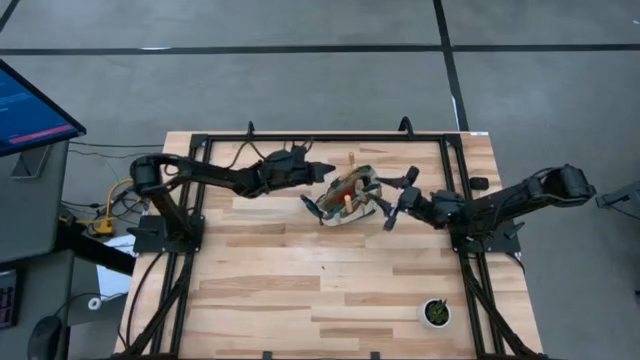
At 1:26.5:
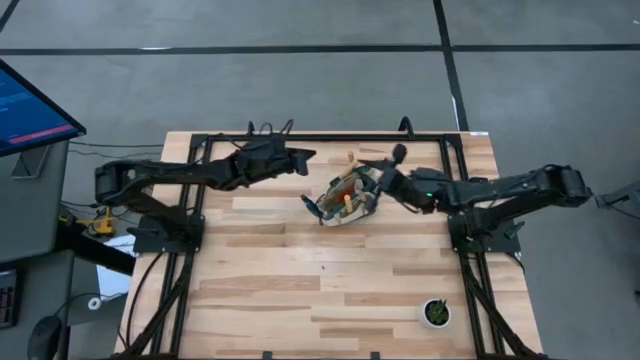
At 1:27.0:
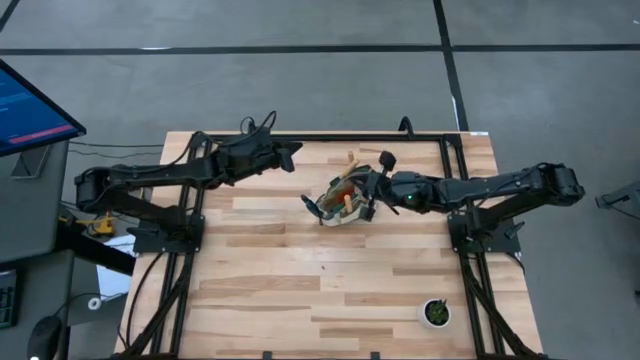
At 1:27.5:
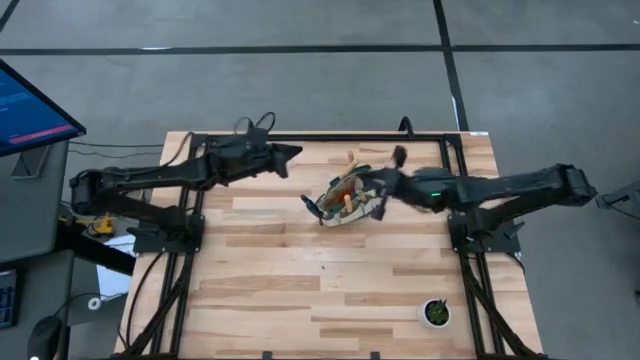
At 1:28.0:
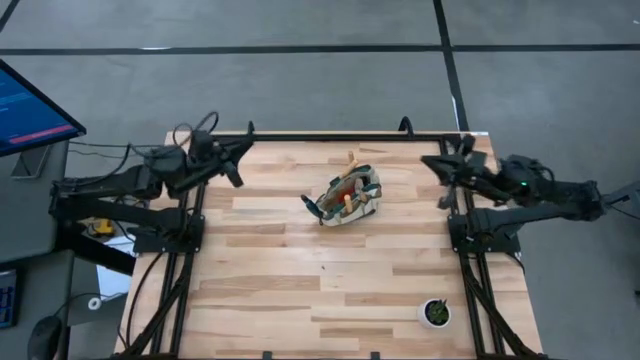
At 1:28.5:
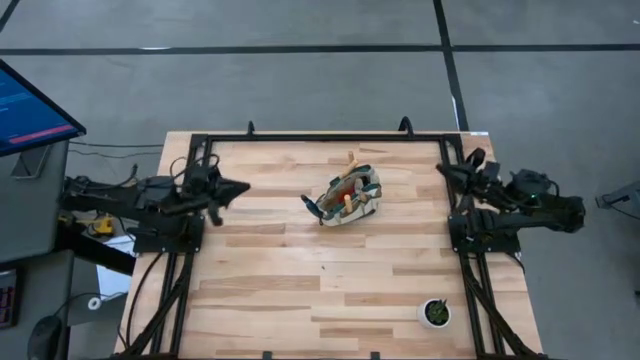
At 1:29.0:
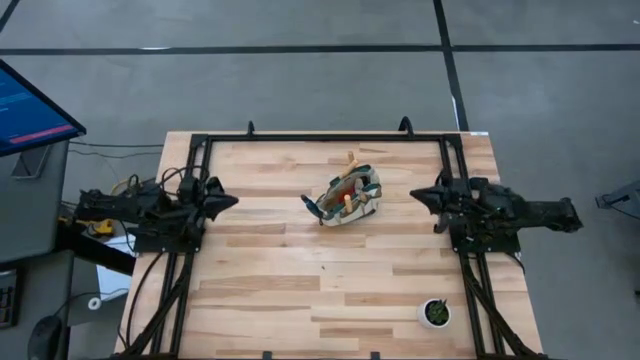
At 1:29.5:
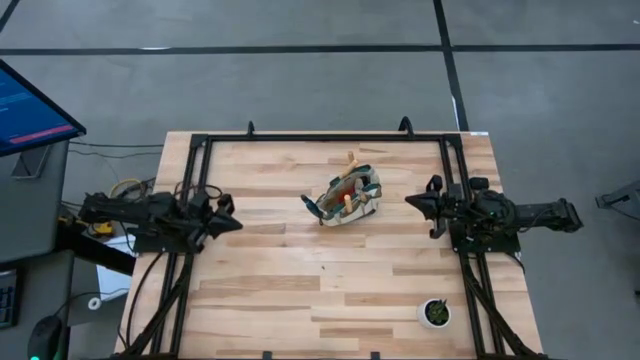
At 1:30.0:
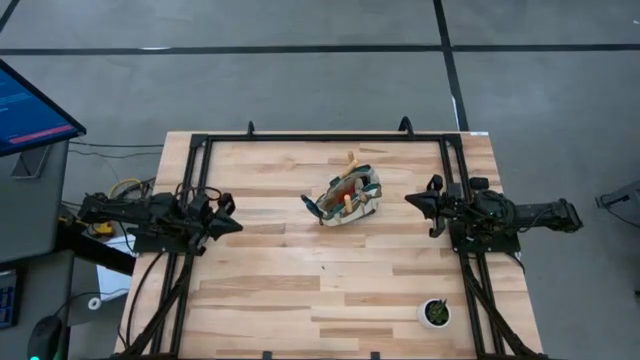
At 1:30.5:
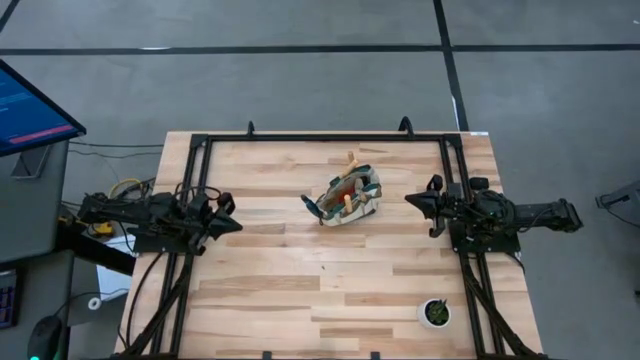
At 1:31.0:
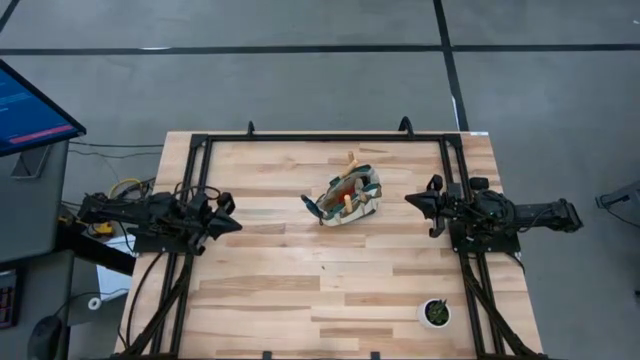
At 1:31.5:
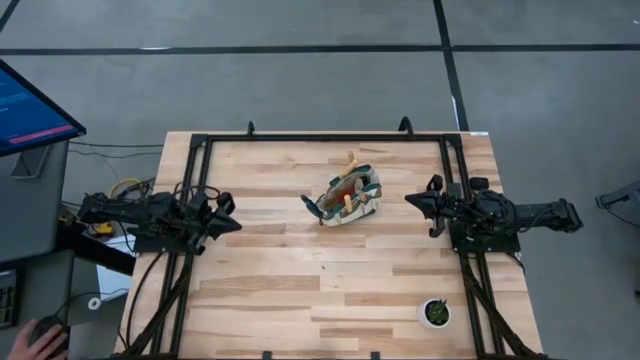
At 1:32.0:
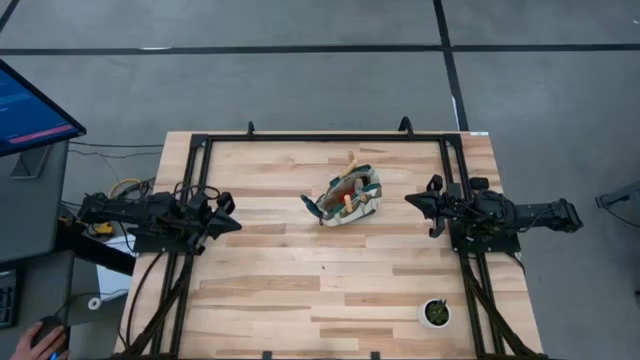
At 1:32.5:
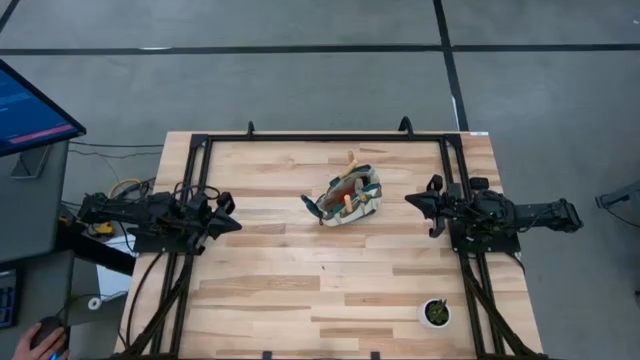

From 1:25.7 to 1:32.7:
Task: Pick & Place Garden tools in Gardening bag
Return to Home Position

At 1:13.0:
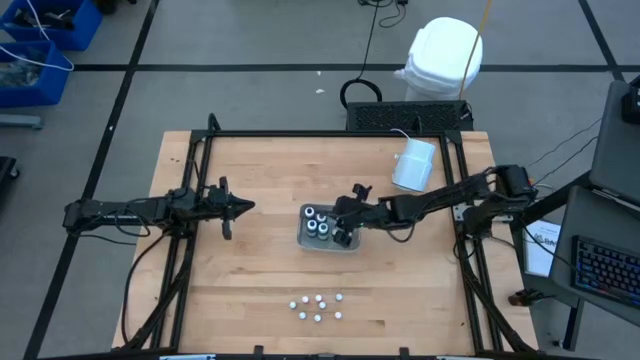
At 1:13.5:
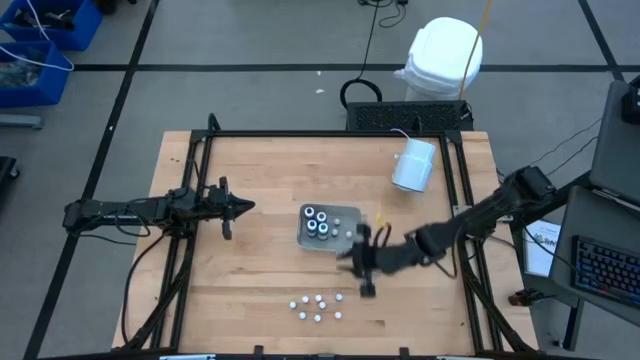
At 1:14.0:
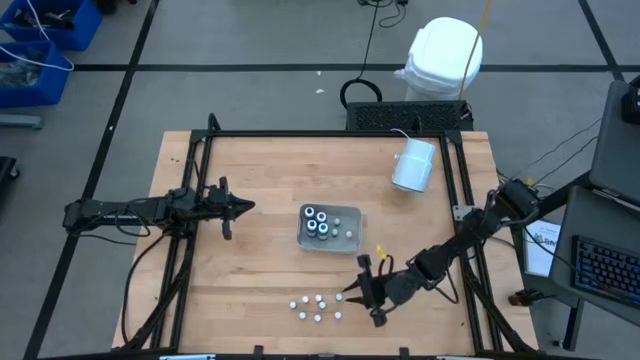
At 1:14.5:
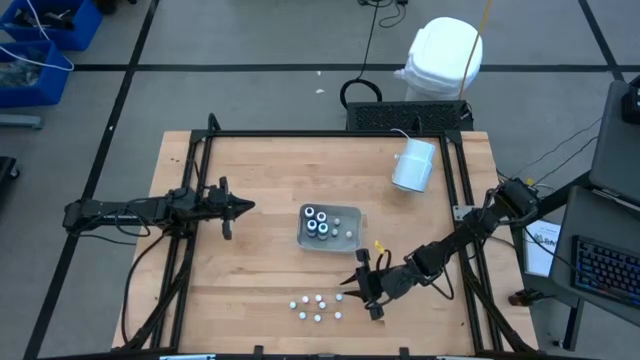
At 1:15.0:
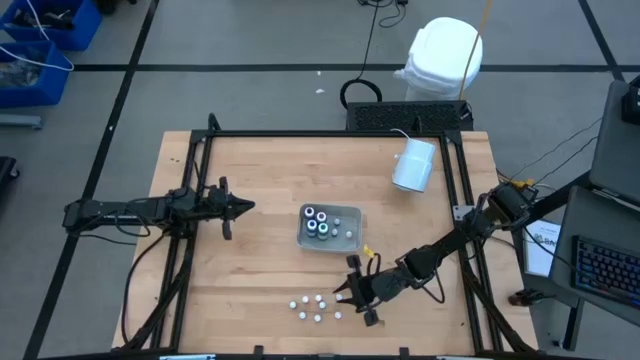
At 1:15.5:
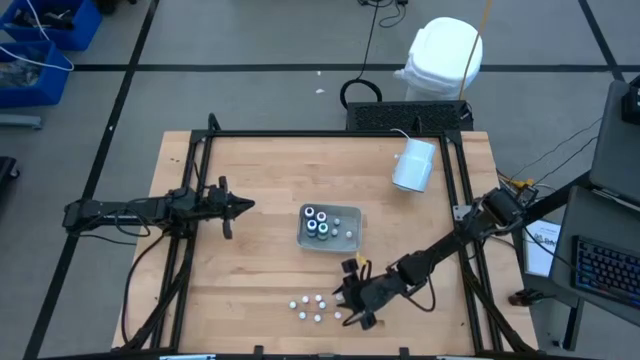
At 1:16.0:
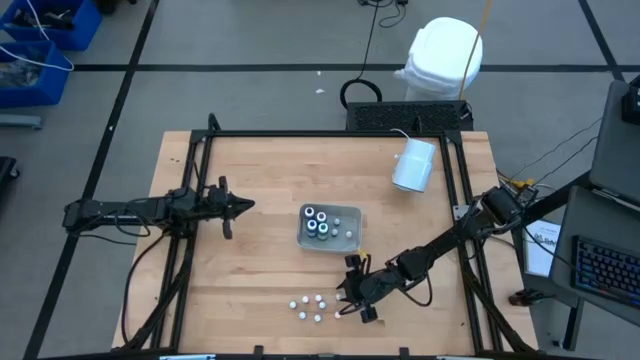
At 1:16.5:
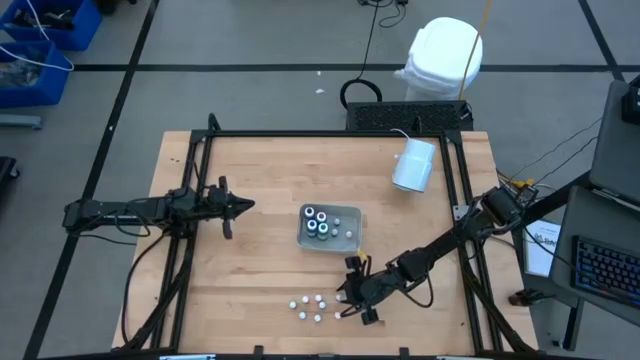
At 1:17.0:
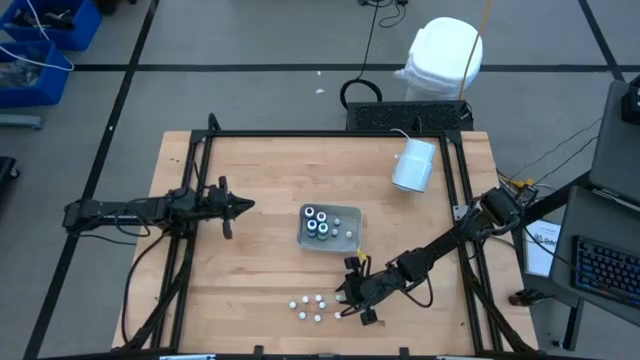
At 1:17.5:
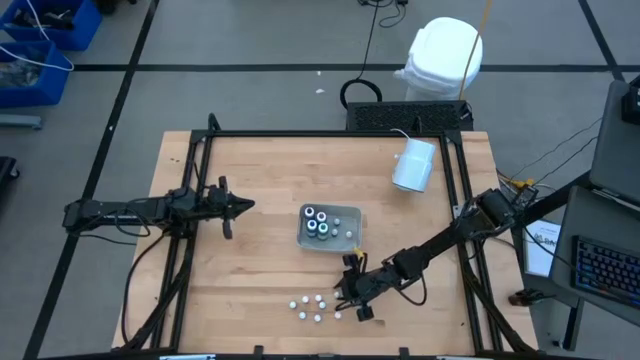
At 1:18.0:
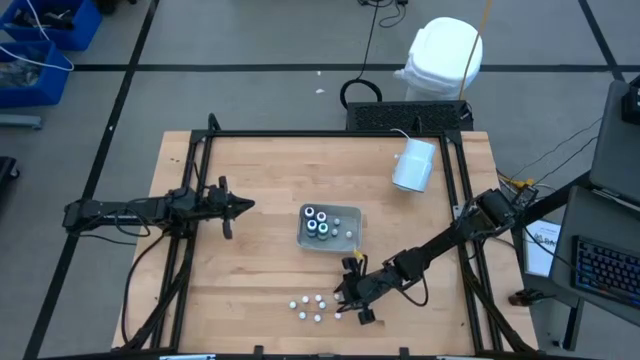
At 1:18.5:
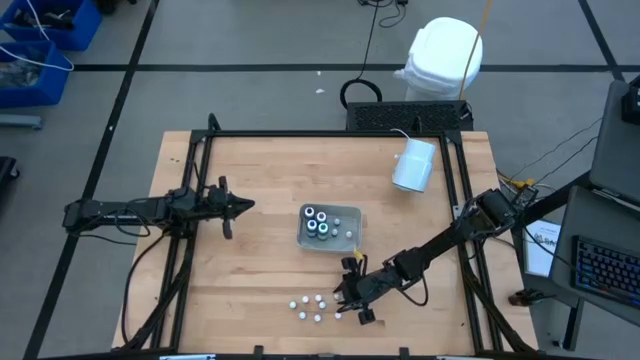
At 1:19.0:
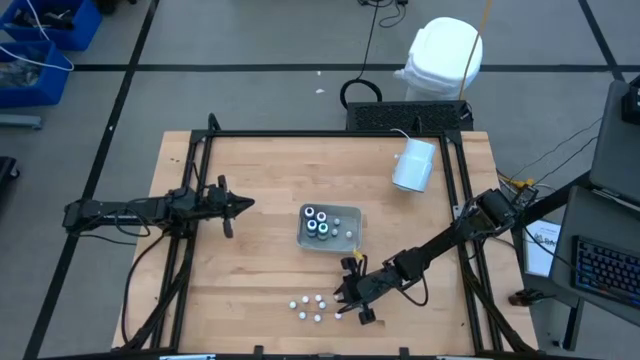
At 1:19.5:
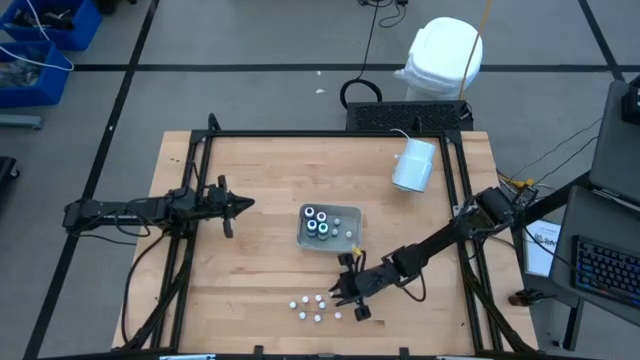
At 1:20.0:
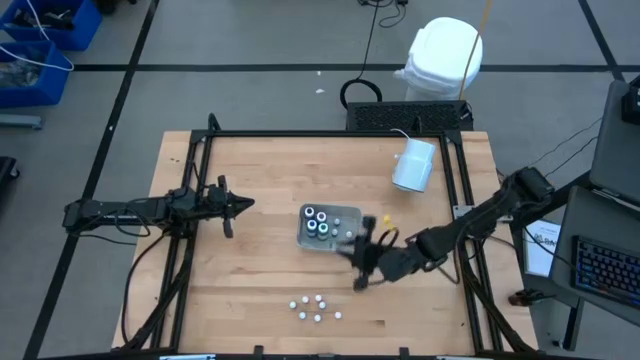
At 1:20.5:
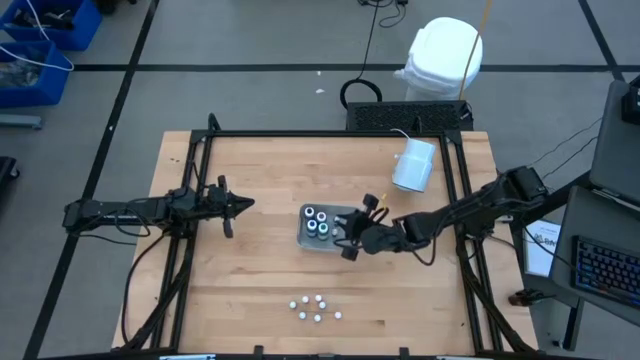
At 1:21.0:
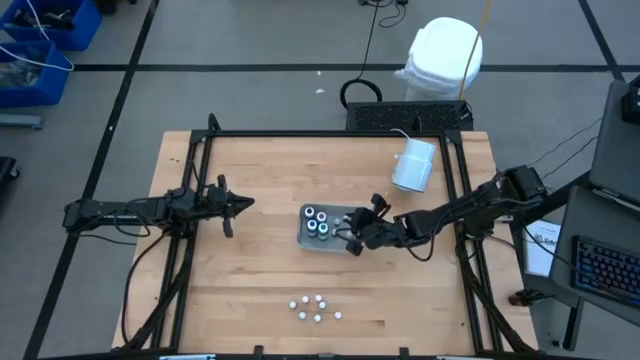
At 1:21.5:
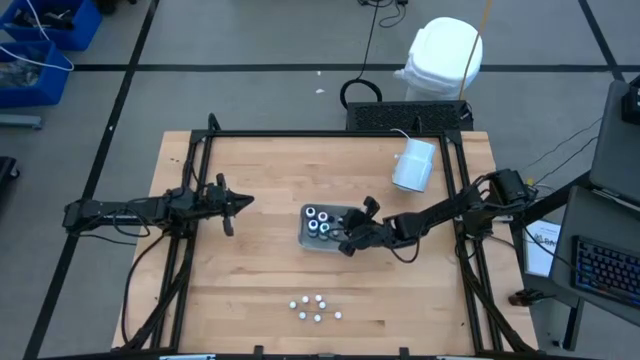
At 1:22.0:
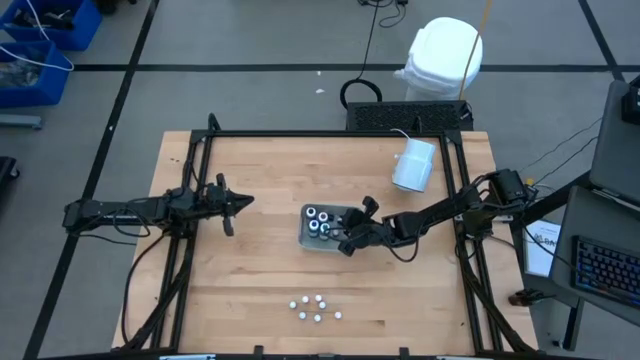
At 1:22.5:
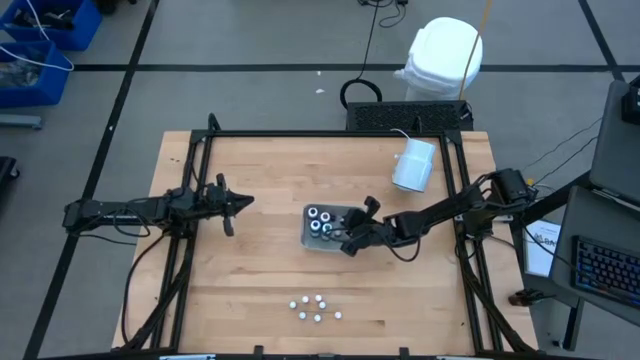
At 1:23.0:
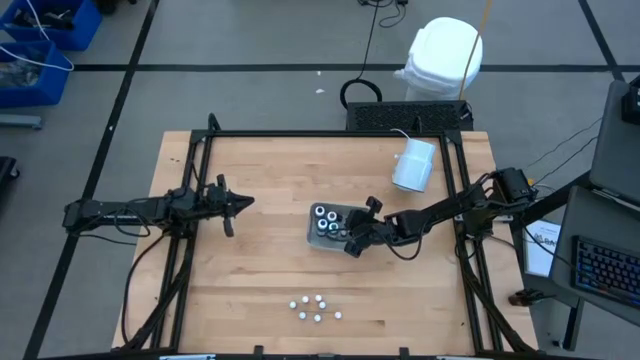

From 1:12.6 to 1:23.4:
Task: Pick & Place food coloring
Put the small green bottle into the gray bin
